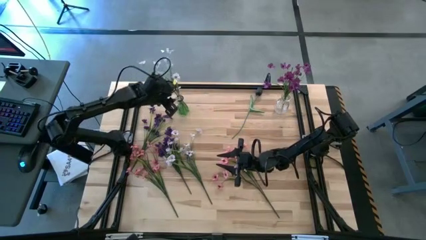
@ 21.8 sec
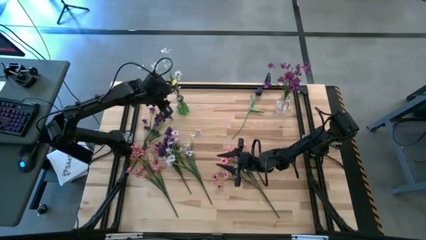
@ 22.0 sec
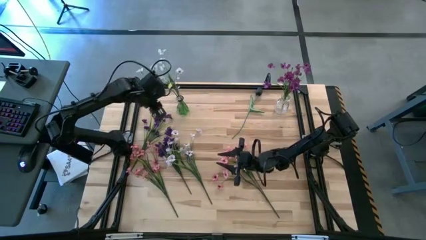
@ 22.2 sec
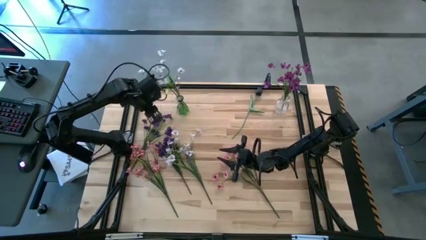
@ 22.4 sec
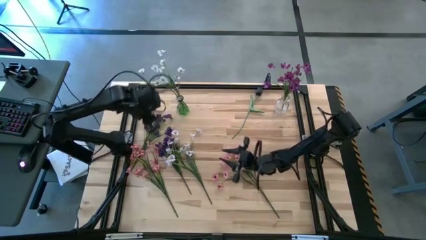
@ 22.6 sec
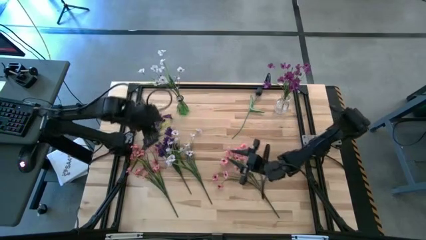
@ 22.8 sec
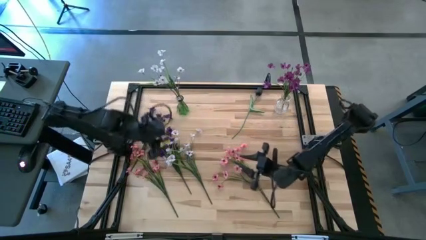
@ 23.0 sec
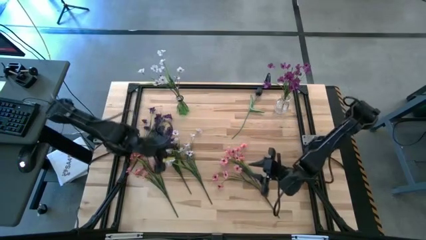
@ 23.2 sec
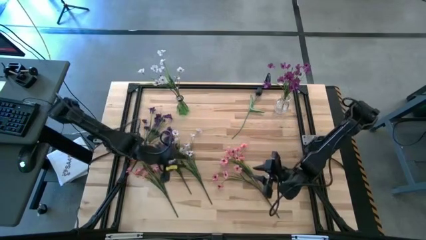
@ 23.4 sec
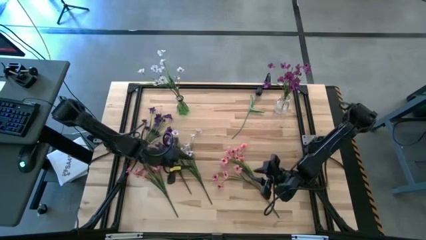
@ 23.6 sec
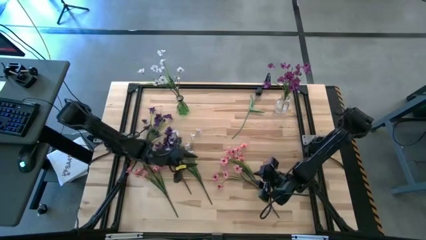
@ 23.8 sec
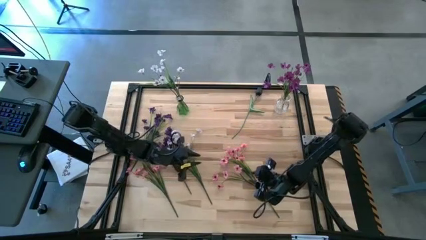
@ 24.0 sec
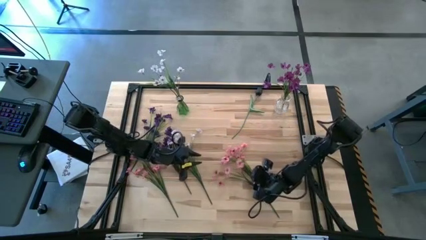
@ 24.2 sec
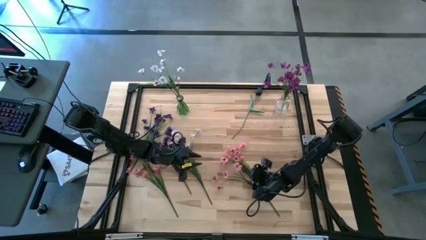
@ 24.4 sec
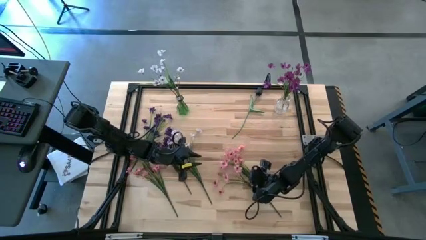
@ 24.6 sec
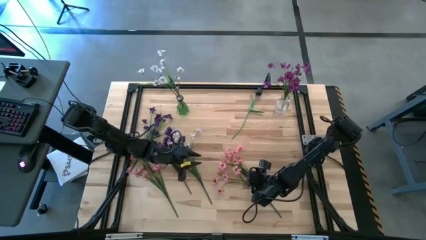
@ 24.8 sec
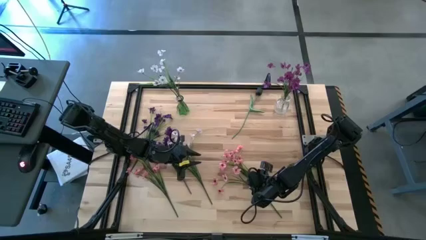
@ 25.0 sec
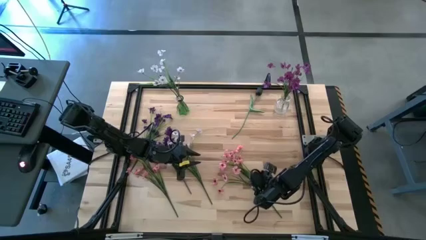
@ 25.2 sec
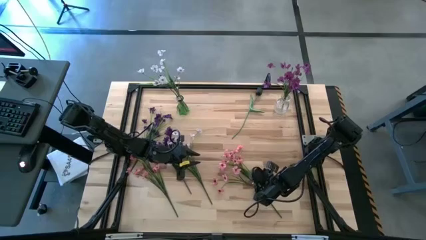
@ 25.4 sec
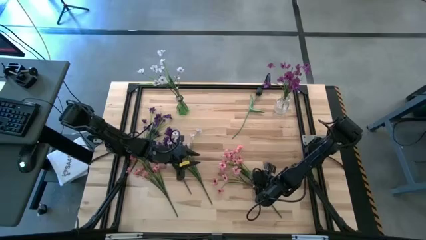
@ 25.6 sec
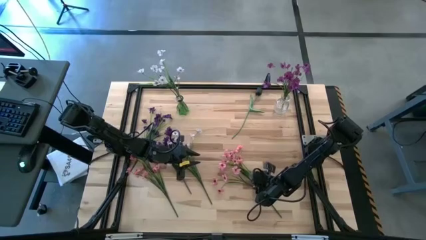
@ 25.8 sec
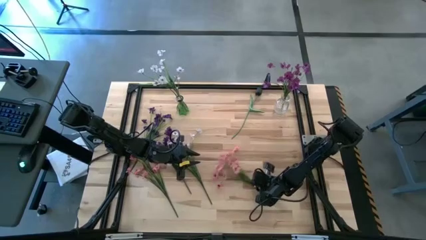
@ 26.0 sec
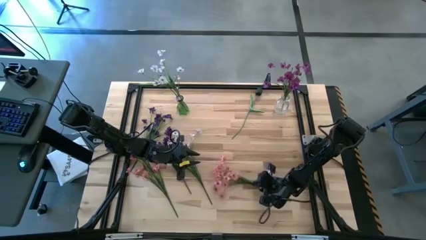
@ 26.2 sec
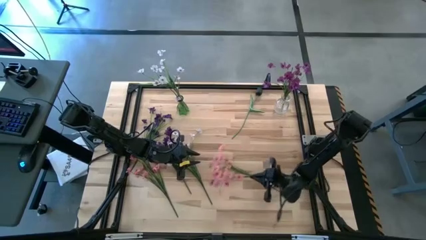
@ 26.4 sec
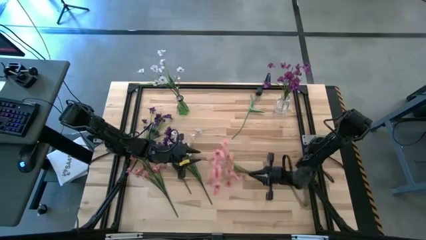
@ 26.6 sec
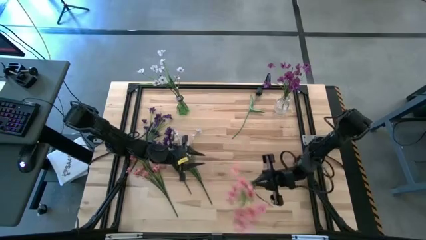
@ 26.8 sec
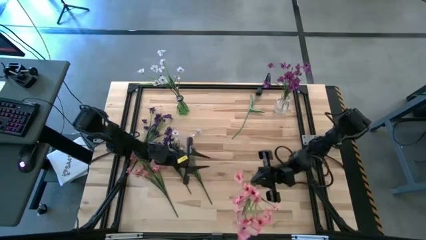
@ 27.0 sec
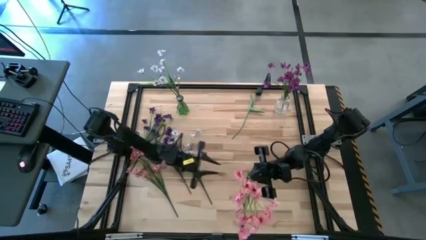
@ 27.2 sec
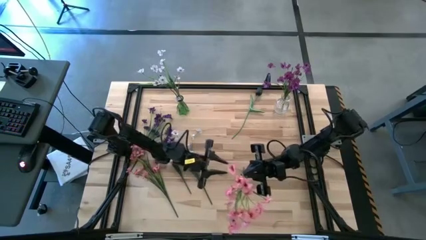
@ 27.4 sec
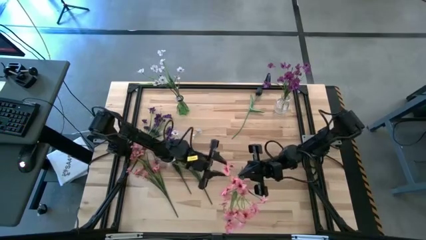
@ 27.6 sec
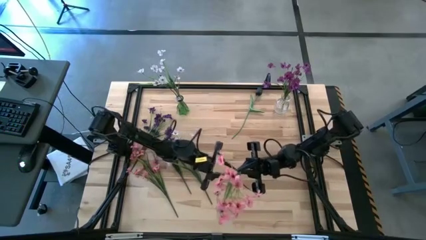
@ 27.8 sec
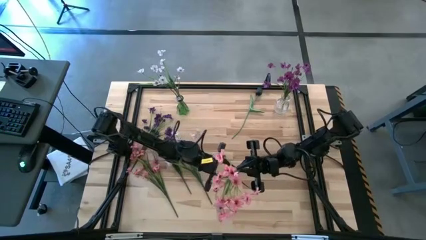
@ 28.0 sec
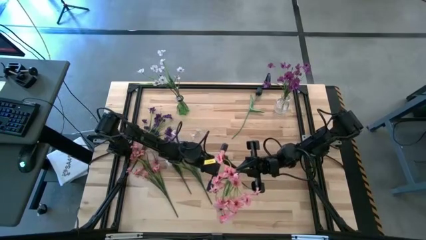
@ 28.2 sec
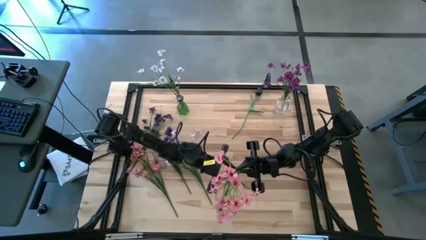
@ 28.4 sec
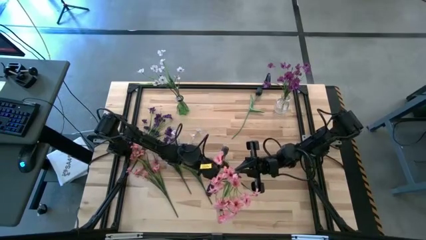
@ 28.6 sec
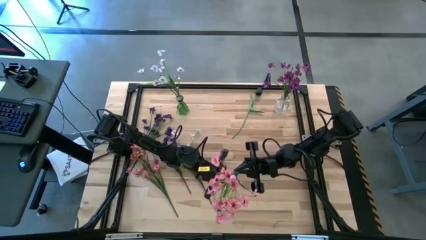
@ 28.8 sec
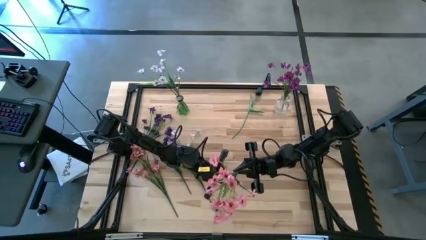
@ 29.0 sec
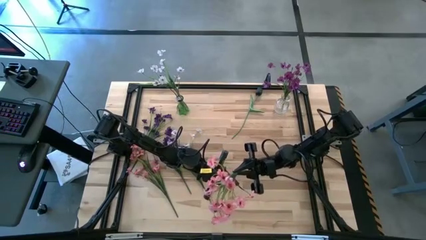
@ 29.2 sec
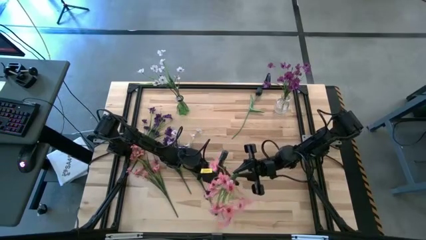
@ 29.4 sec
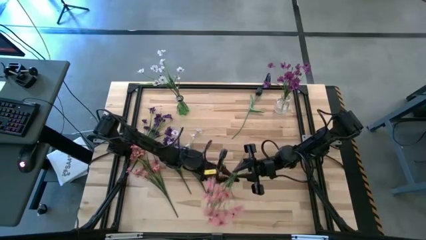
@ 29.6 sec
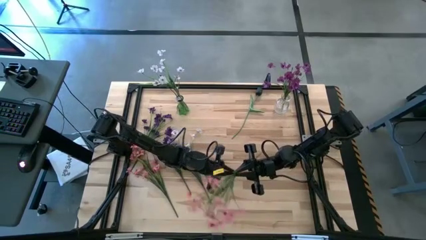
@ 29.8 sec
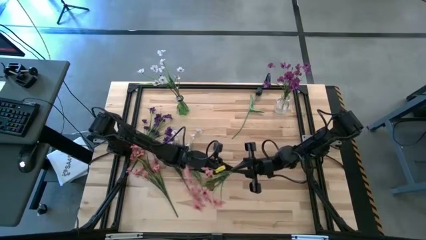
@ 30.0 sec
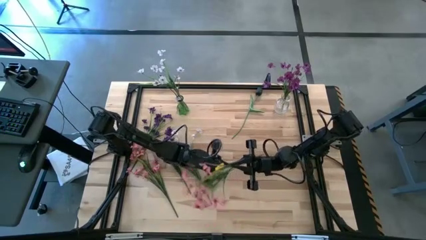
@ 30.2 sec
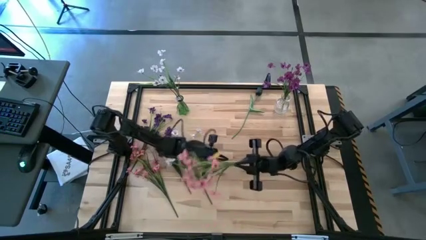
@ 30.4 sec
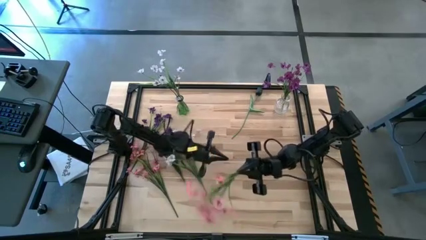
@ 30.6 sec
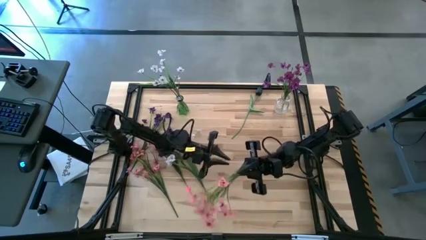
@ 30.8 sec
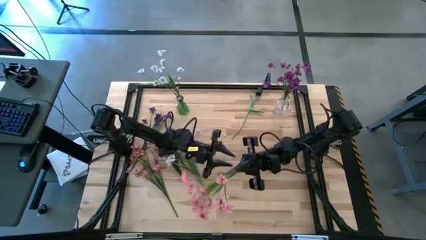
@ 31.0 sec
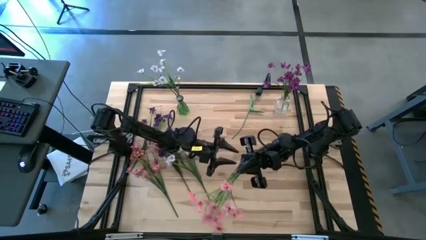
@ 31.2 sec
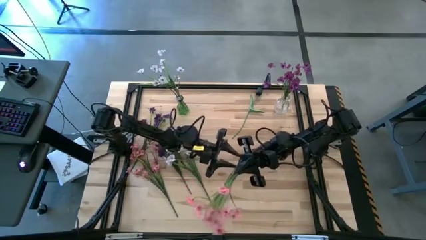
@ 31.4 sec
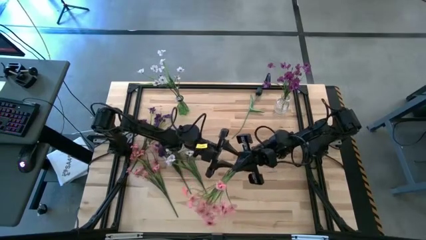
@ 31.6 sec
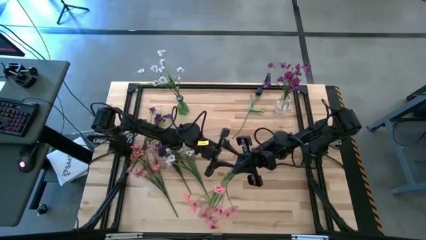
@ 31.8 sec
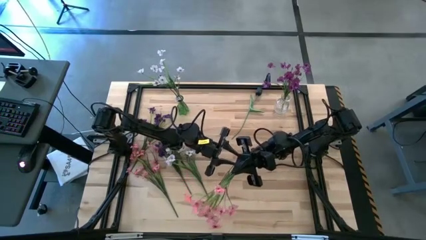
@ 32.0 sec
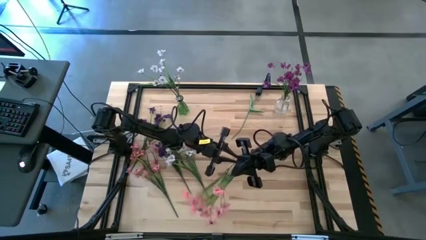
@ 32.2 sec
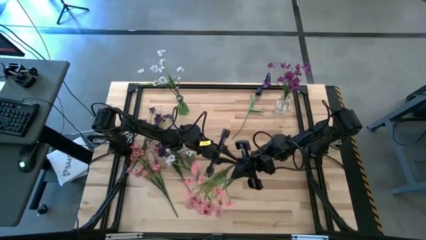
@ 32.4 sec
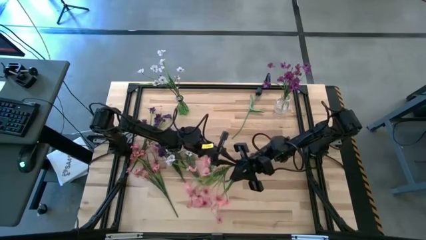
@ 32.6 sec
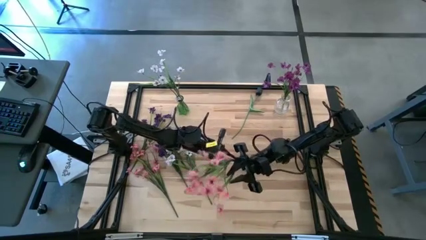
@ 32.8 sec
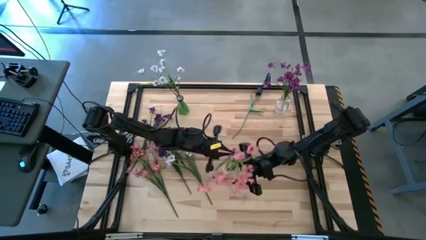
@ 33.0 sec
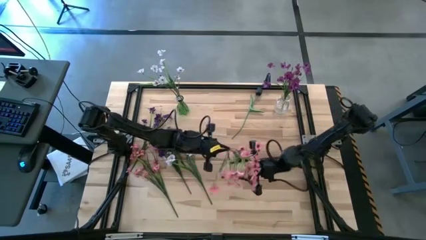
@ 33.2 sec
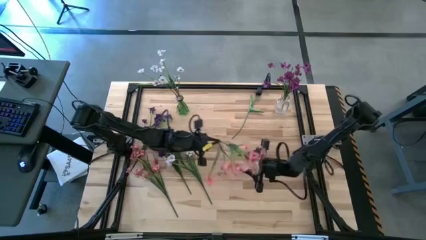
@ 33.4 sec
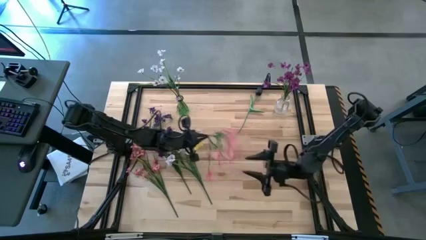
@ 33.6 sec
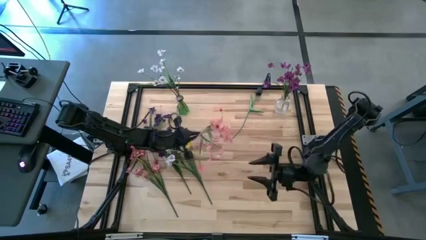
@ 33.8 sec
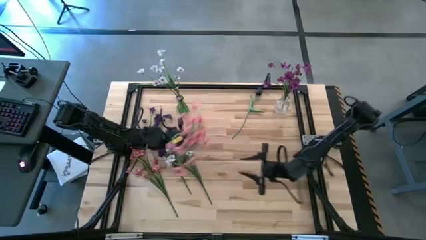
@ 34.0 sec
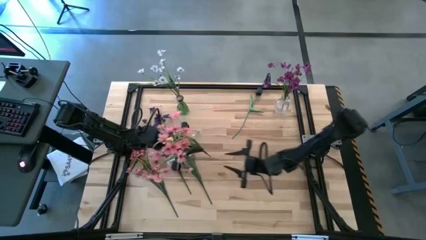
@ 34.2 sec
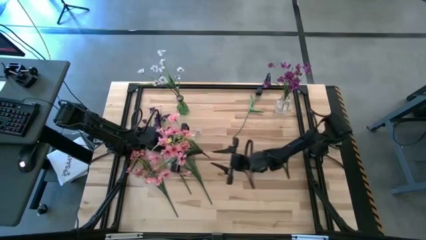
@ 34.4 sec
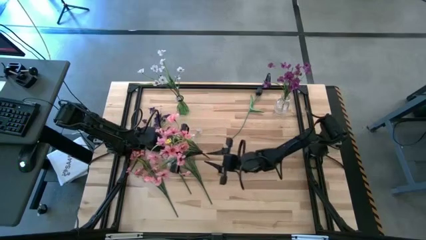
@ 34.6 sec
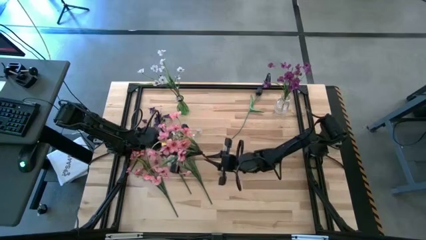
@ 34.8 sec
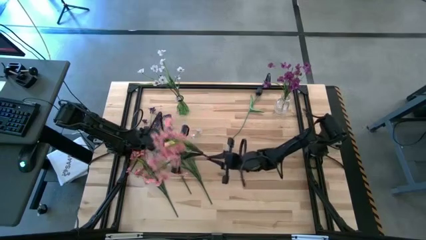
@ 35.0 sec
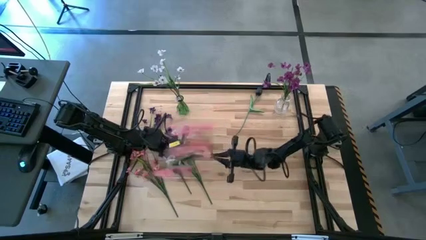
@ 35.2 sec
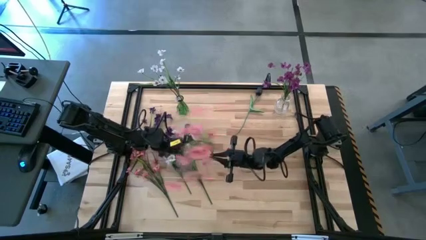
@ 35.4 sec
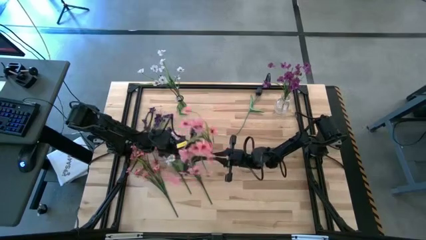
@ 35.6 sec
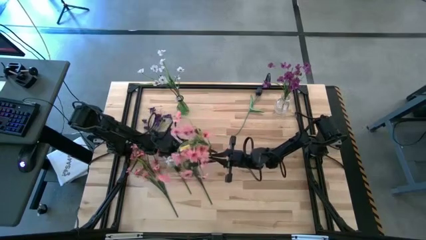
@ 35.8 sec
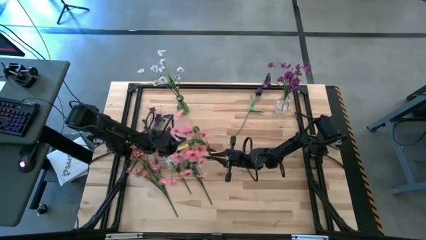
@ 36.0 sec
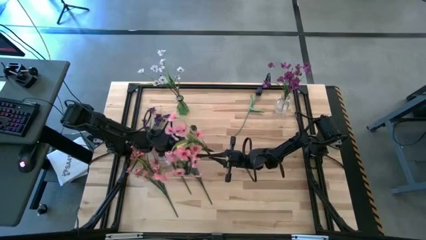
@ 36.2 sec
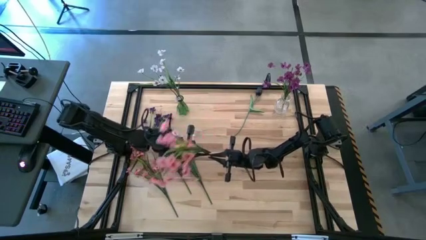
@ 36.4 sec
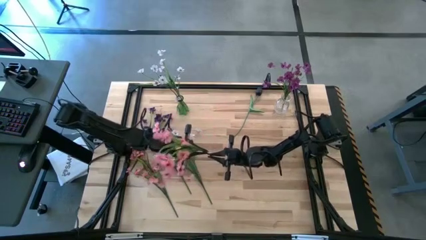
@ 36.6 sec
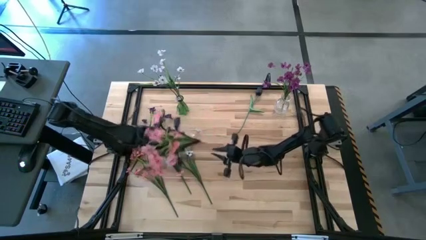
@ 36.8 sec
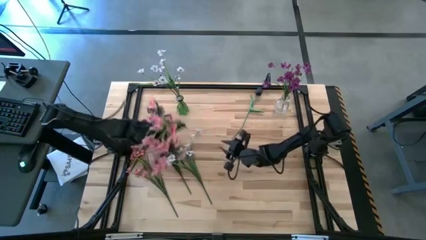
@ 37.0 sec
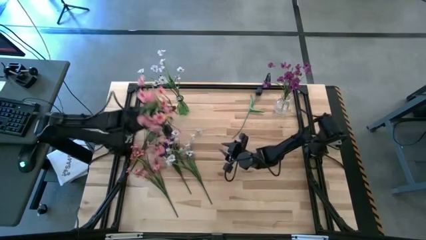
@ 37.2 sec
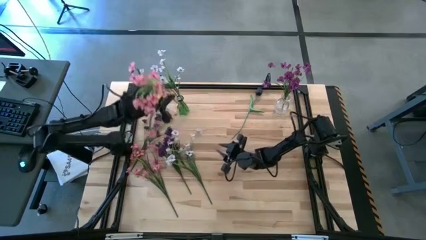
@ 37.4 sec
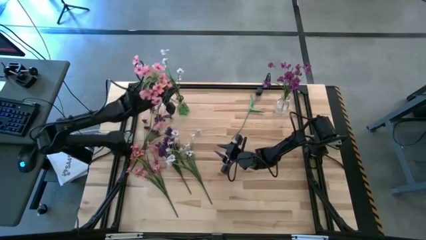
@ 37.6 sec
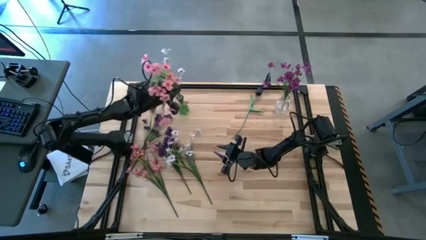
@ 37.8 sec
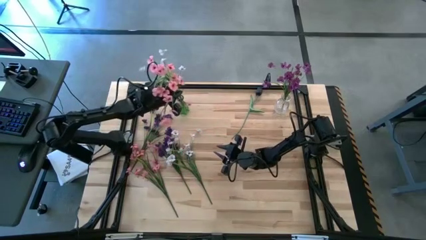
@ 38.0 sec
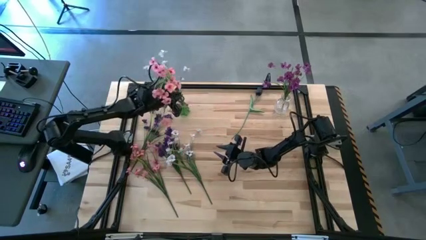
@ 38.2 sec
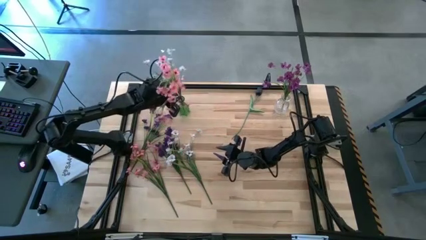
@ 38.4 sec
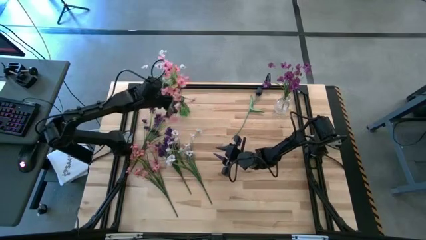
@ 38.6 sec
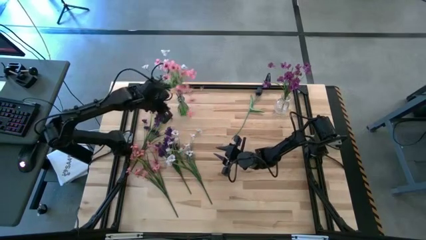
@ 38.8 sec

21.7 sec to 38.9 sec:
Task: Sort flowers into vase by color
Put the right pink flowers into the green vase
